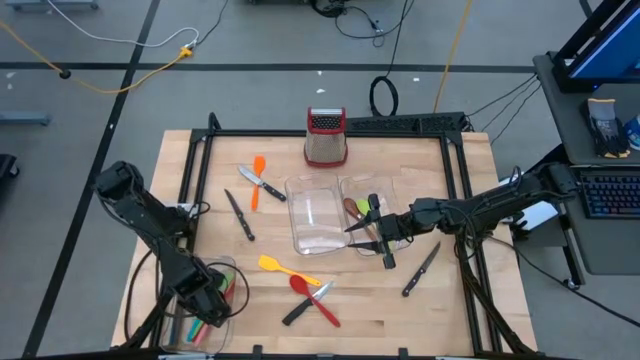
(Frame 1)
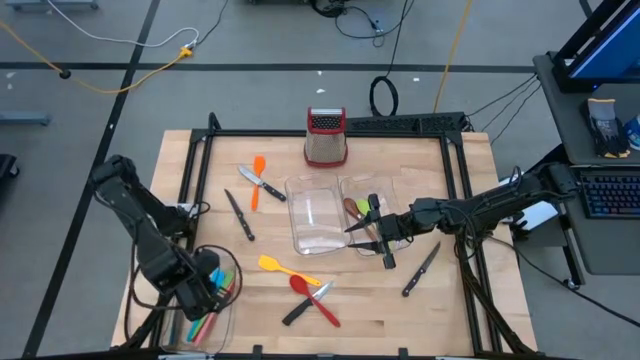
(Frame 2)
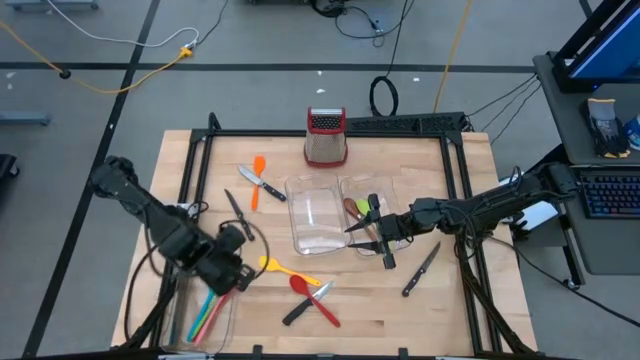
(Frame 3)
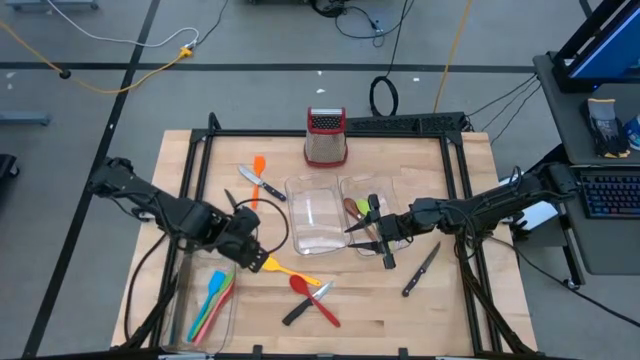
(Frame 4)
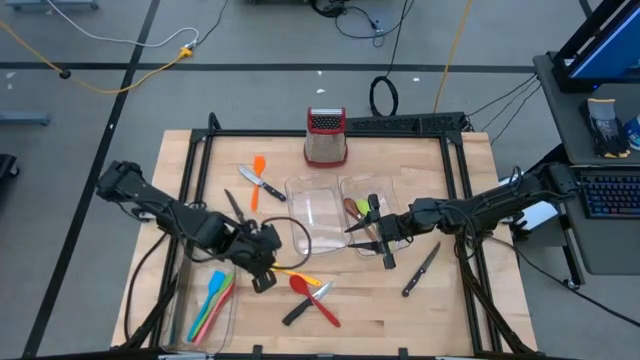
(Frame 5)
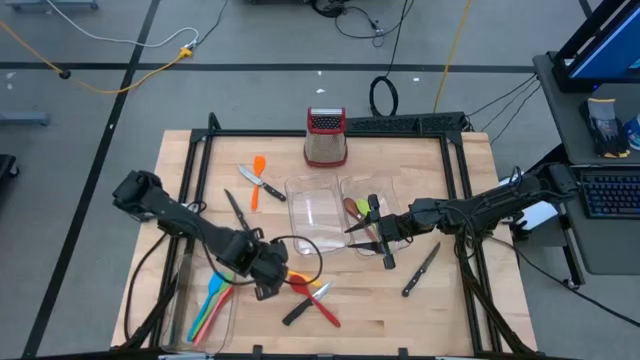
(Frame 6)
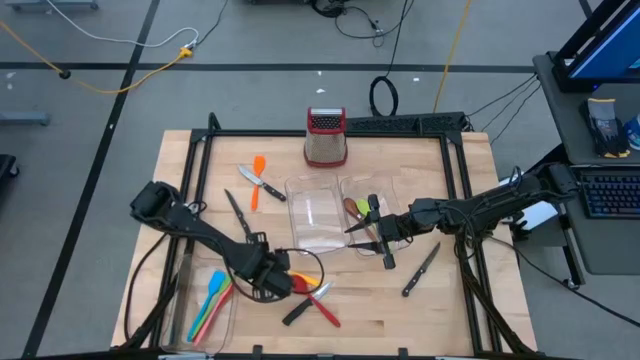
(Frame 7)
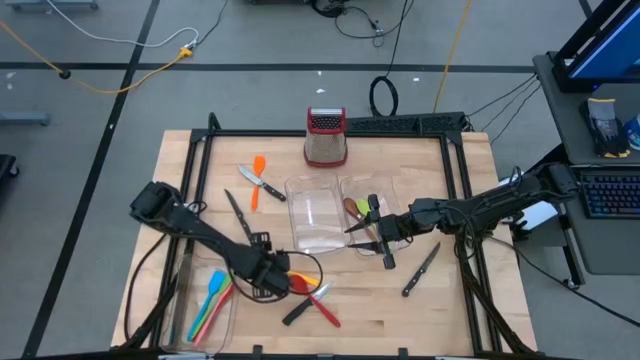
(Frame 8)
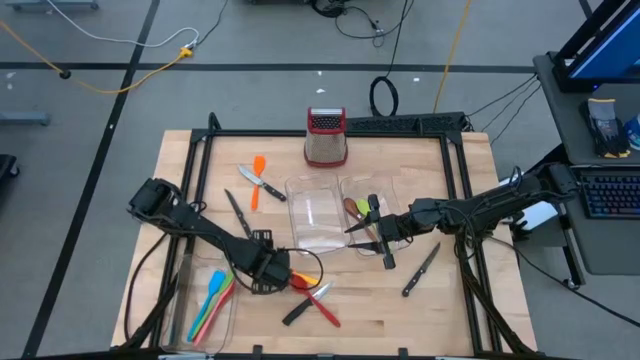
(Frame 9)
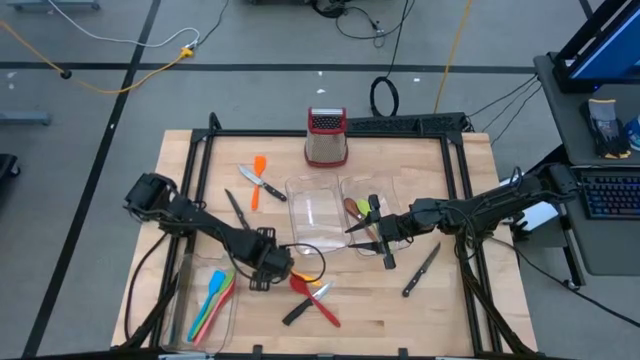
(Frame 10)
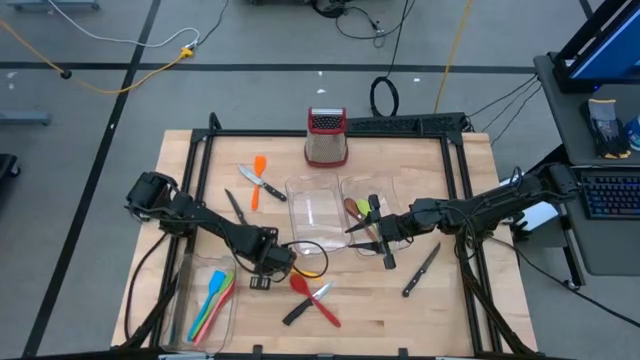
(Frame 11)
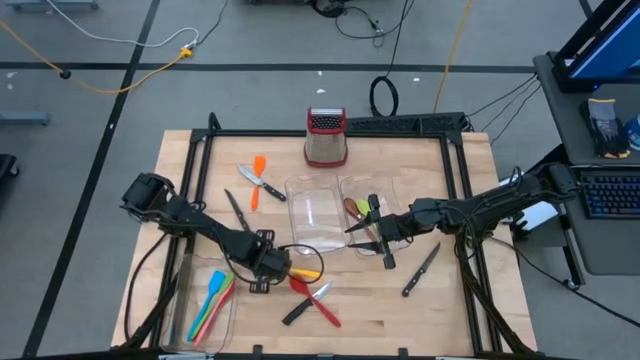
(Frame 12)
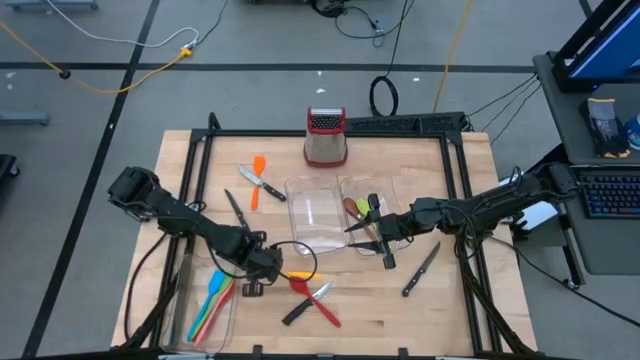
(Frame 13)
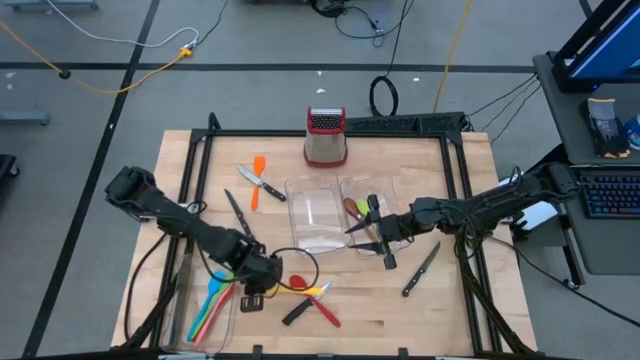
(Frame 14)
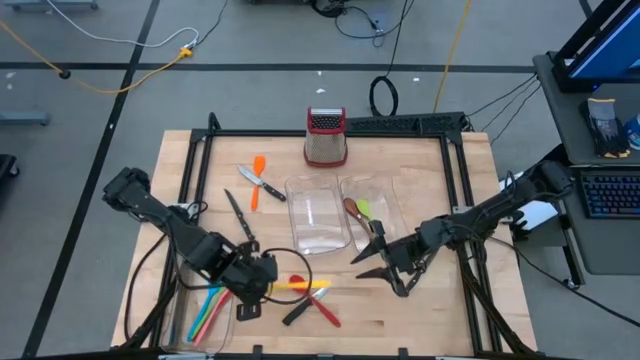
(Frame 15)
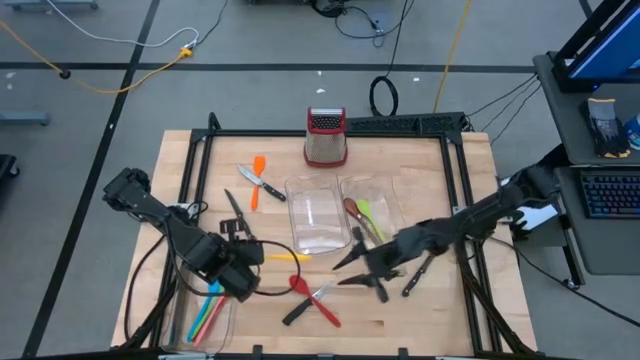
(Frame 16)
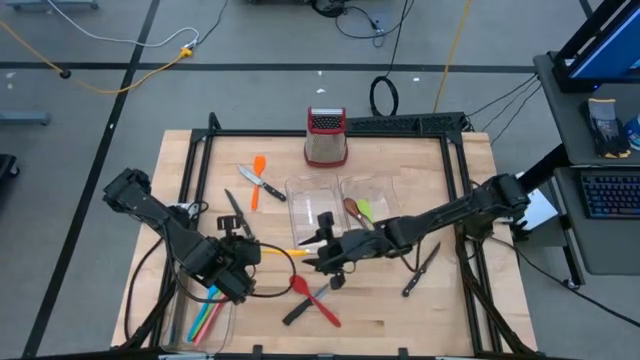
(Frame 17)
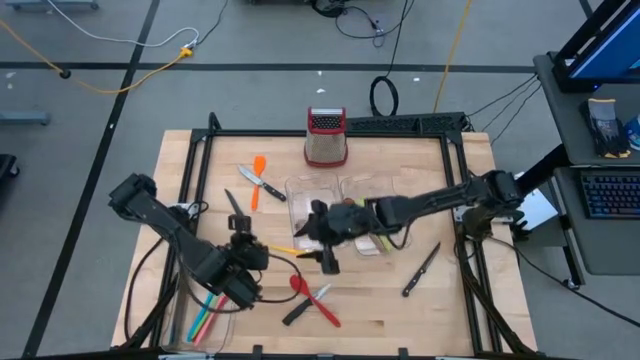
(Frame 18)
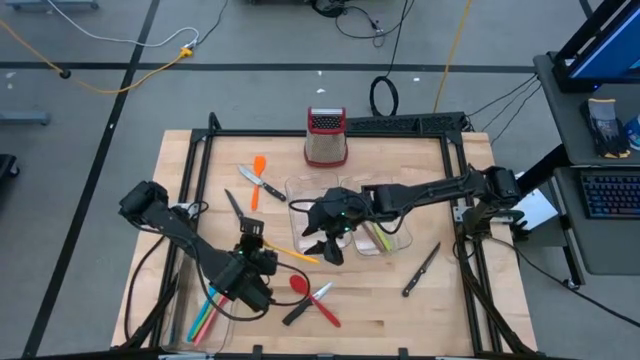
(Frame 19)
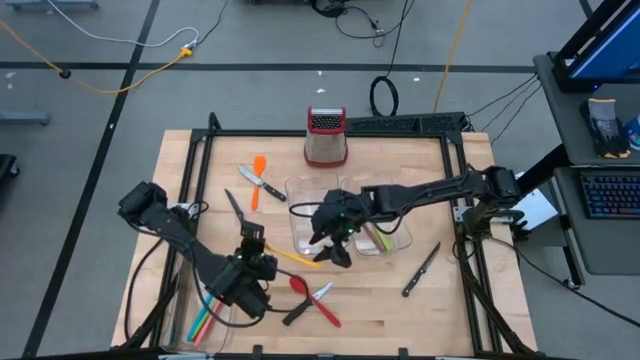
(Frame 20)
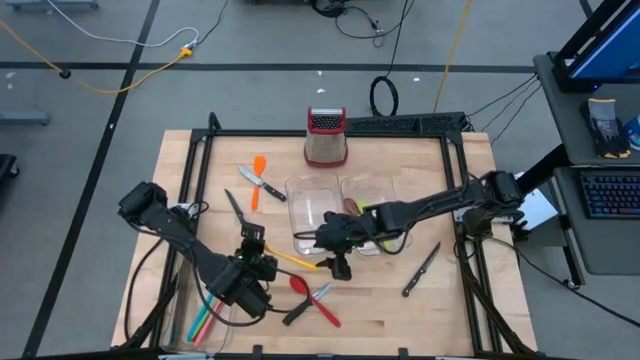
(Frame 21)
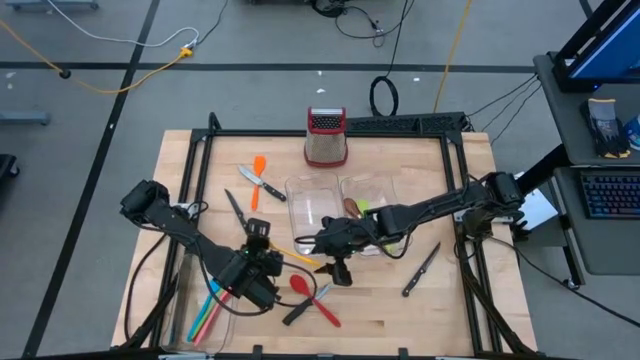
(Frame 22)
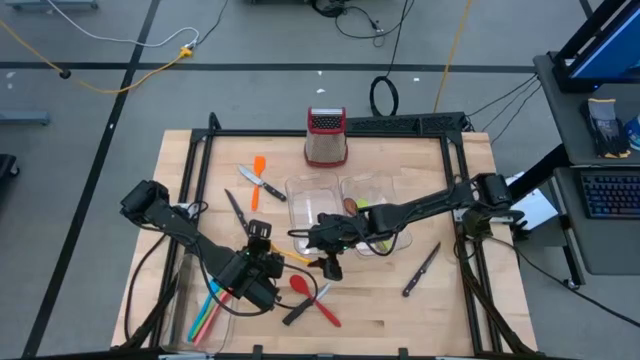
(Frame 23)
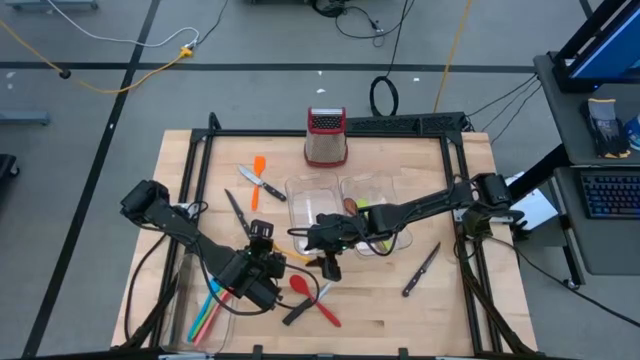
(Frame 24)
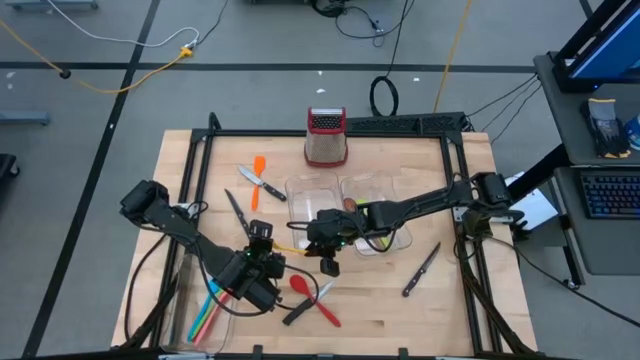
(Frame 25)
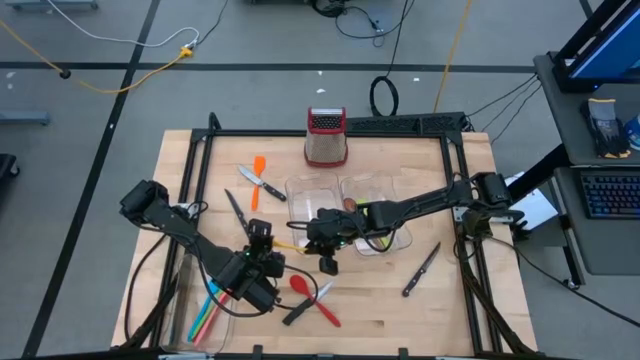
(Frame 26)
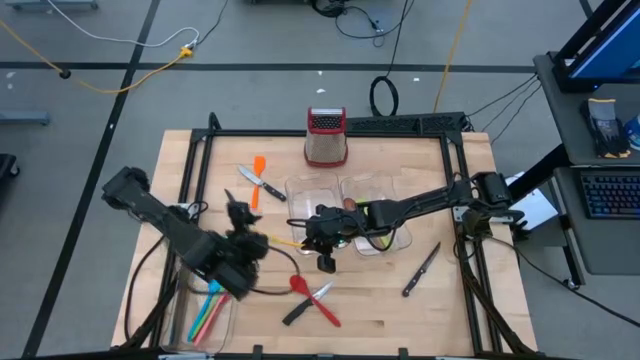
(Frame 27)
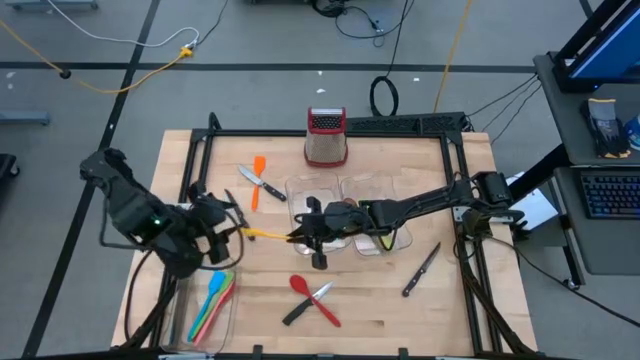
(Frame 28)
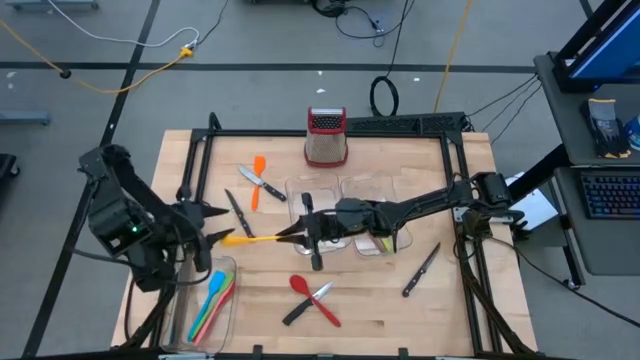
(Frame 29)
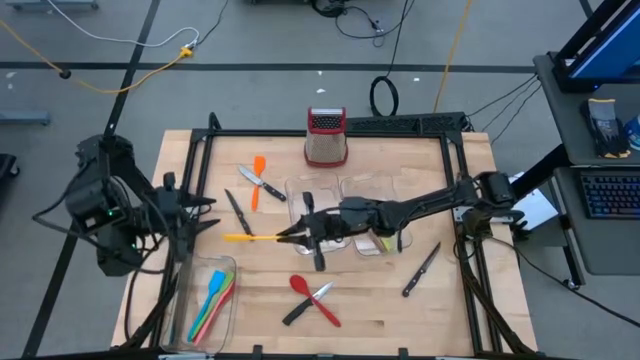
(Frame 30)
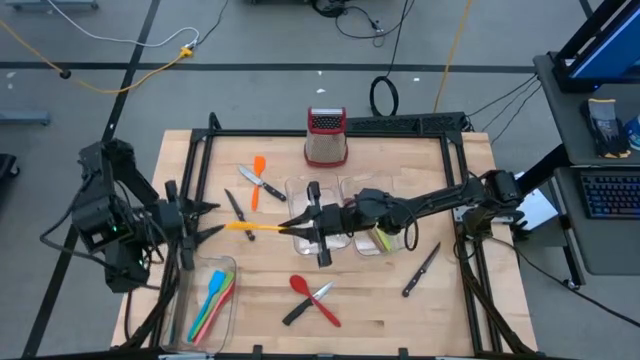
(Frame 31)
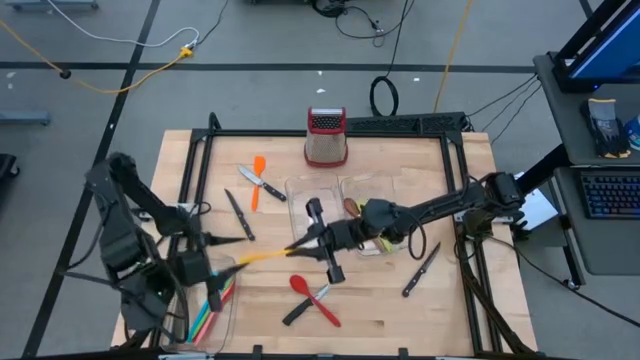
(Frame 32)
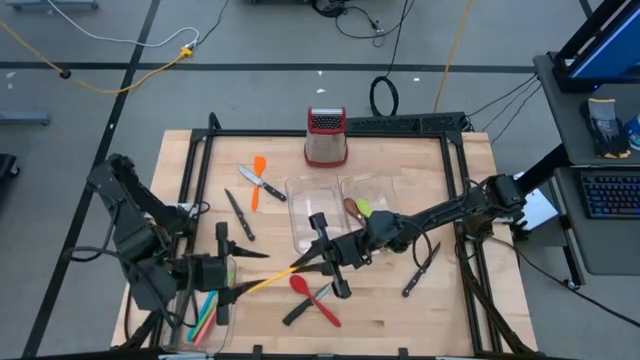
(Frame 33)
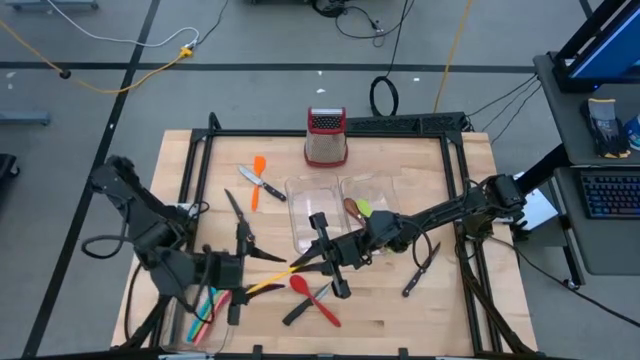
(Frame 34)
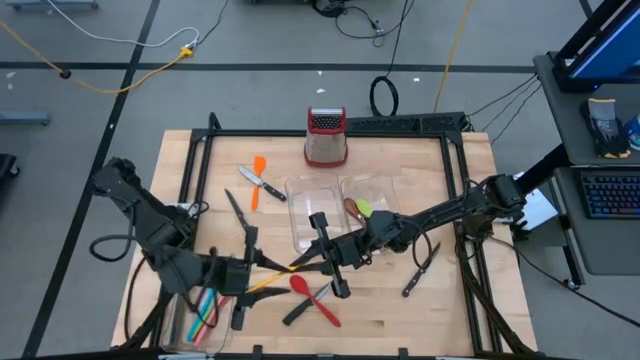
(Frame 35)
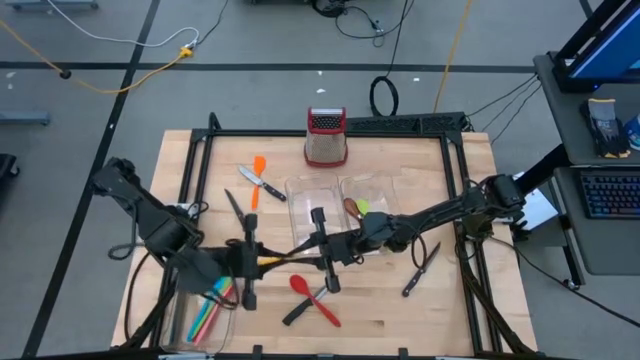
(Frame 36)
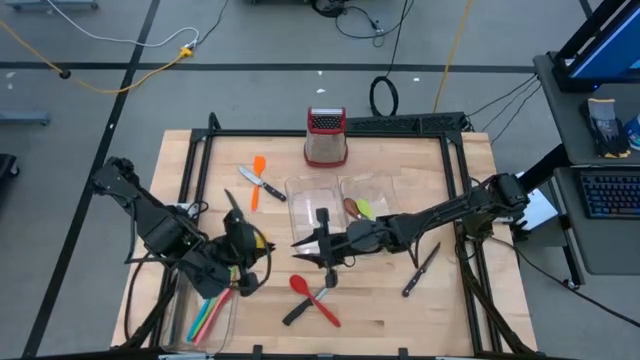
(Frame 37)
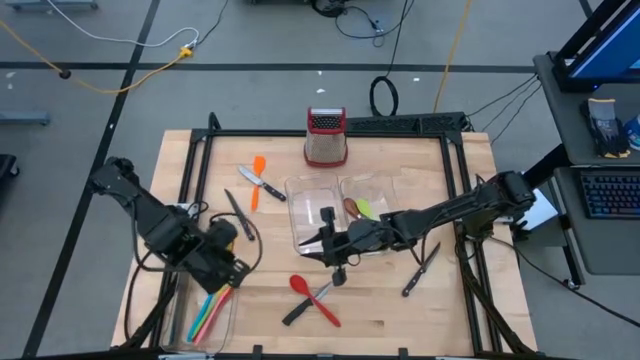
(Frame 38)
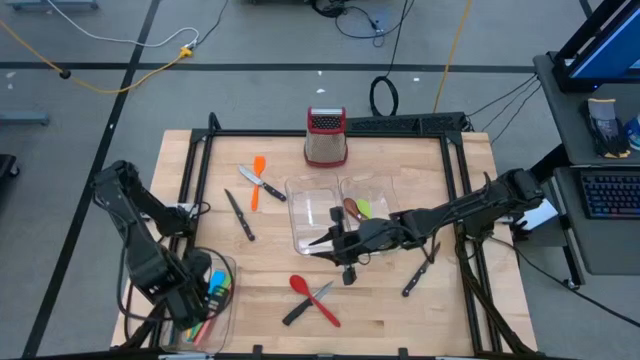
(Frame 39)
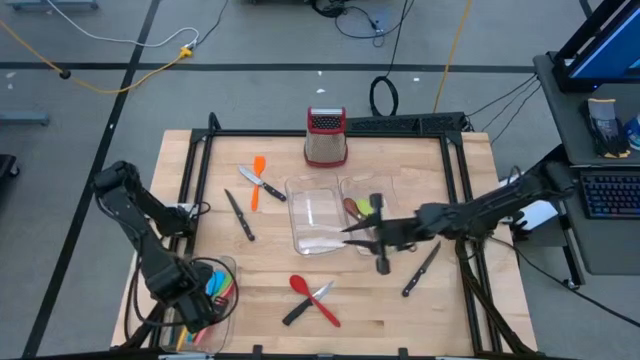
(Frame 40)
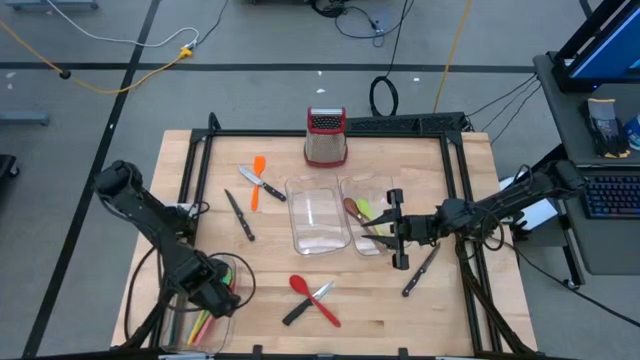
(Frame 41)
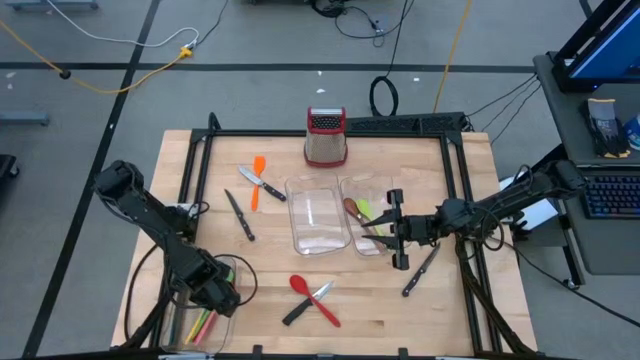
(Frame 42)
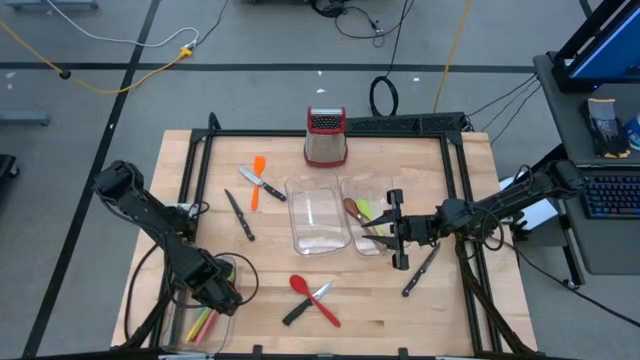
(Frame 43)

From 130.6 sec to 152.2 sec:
Task: Pick & Place Kitchen Items
Put the yellow spatula into the left transparent bin
